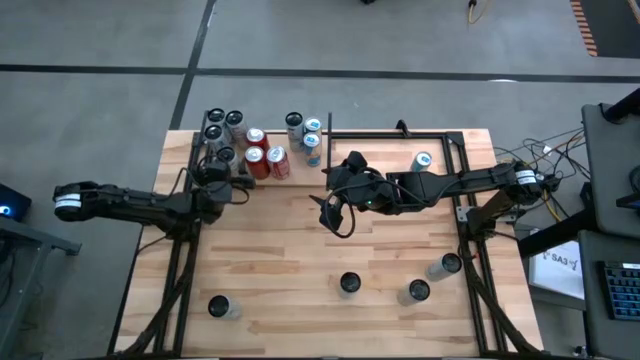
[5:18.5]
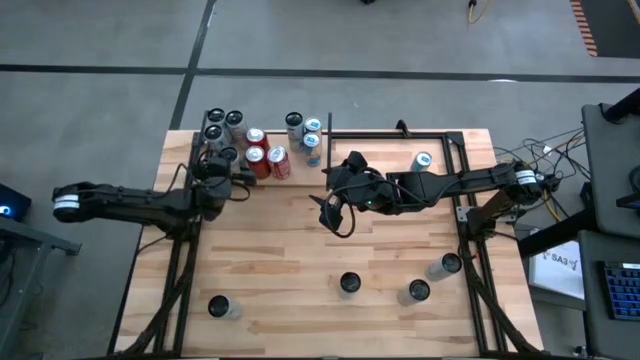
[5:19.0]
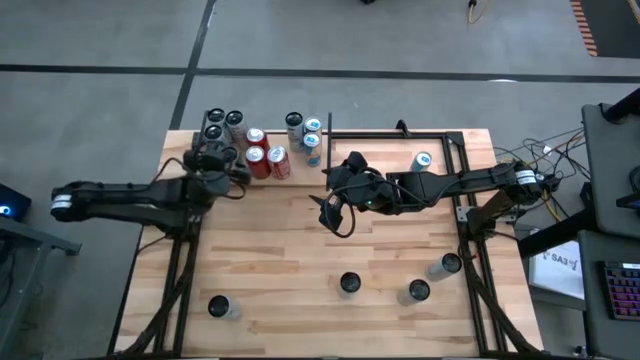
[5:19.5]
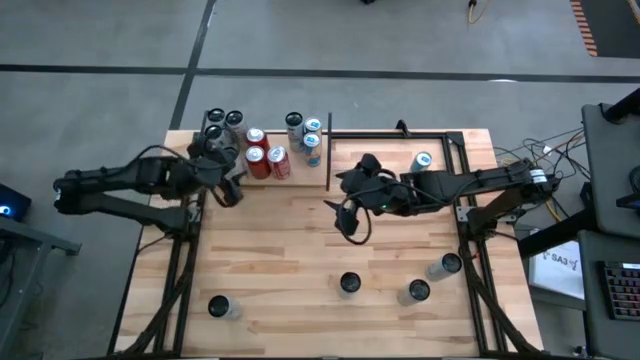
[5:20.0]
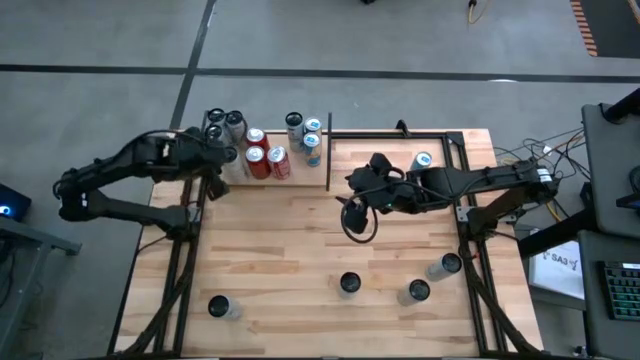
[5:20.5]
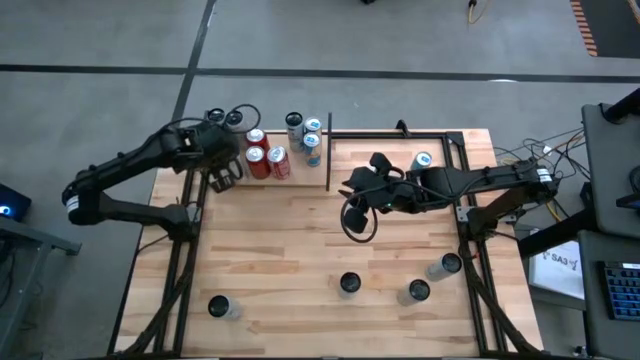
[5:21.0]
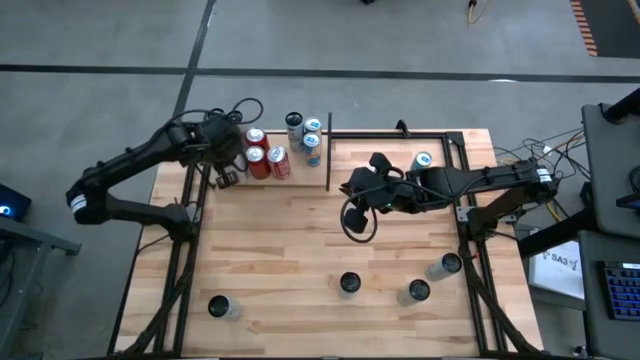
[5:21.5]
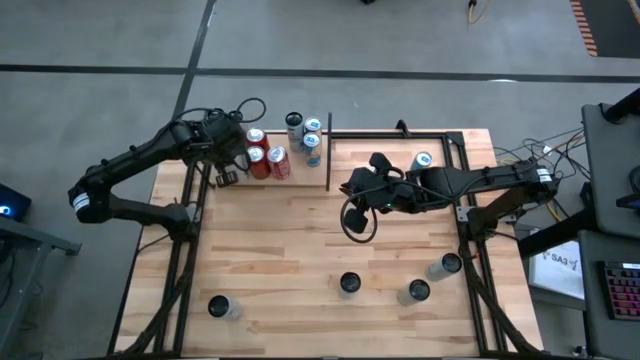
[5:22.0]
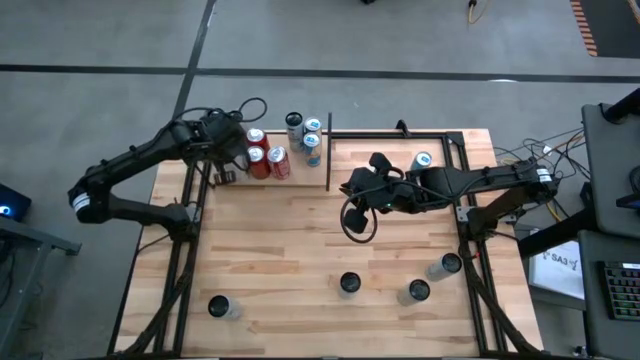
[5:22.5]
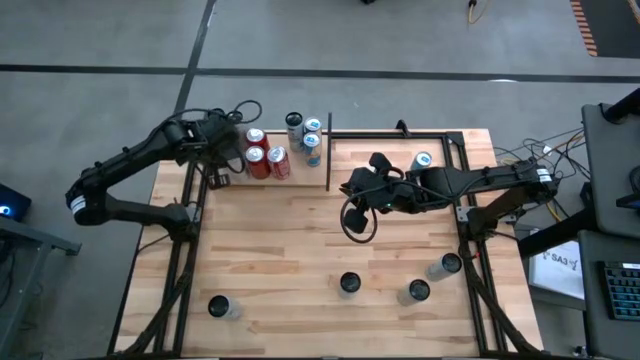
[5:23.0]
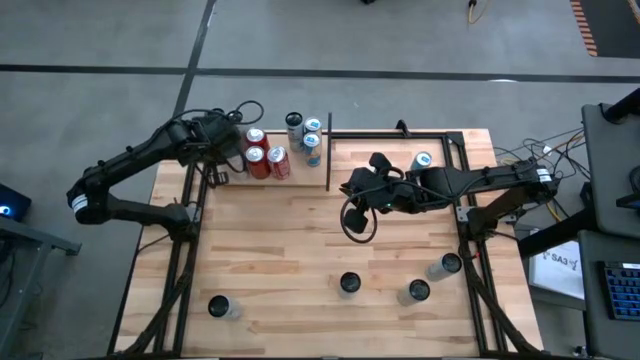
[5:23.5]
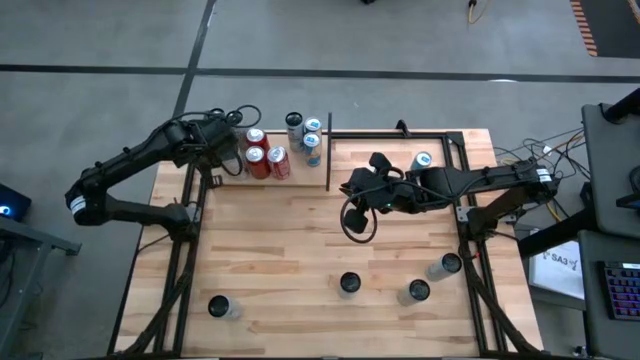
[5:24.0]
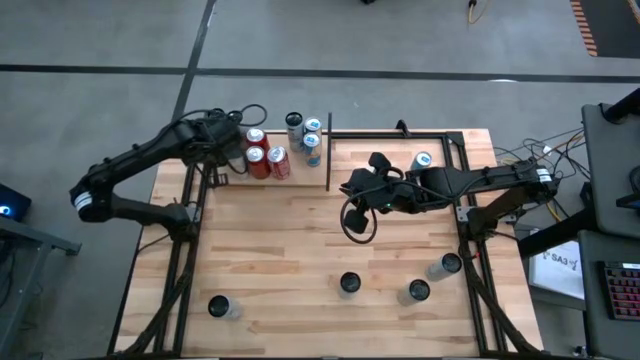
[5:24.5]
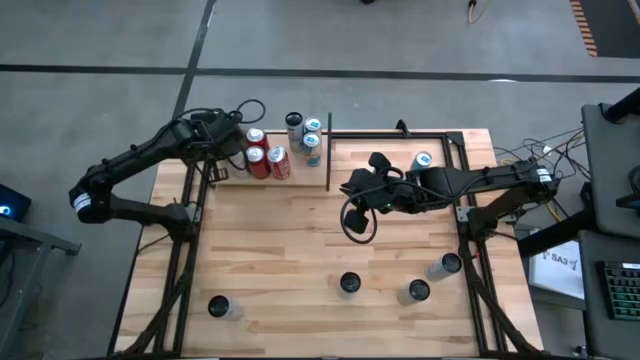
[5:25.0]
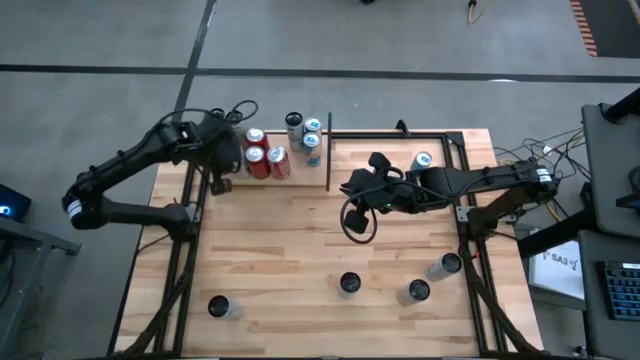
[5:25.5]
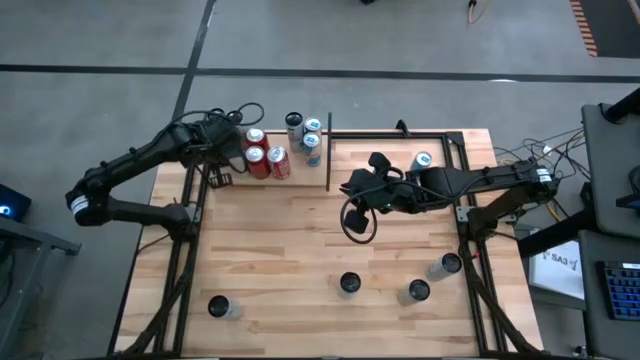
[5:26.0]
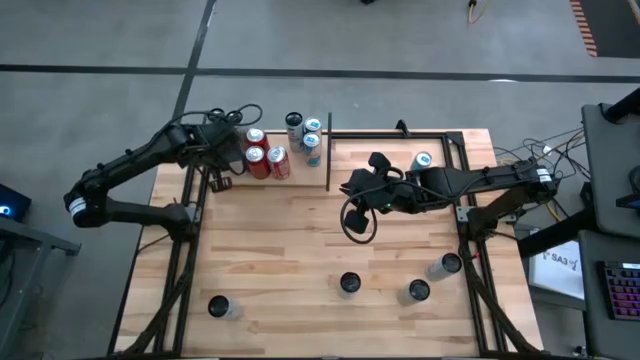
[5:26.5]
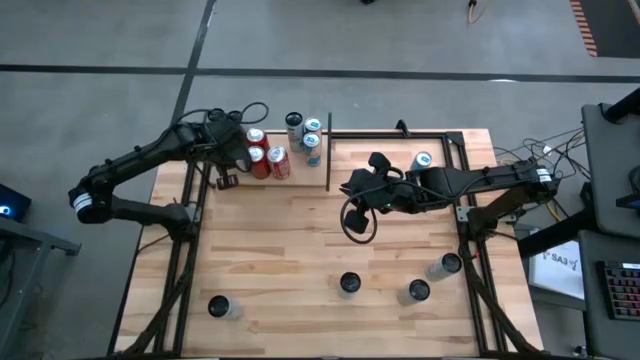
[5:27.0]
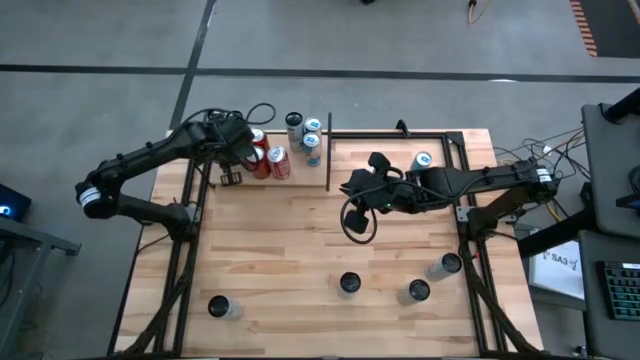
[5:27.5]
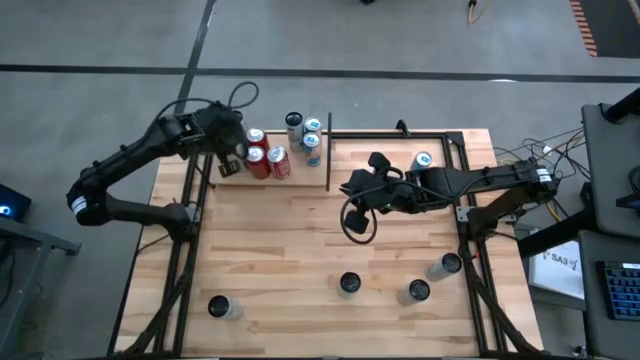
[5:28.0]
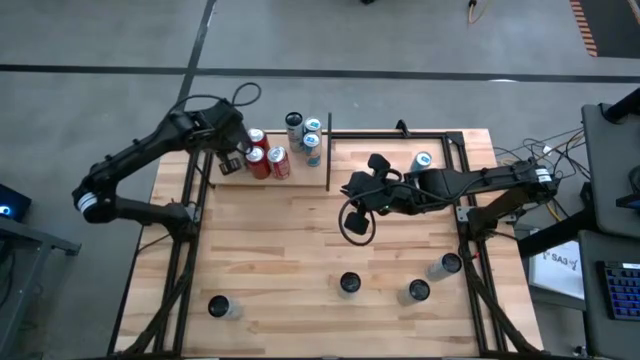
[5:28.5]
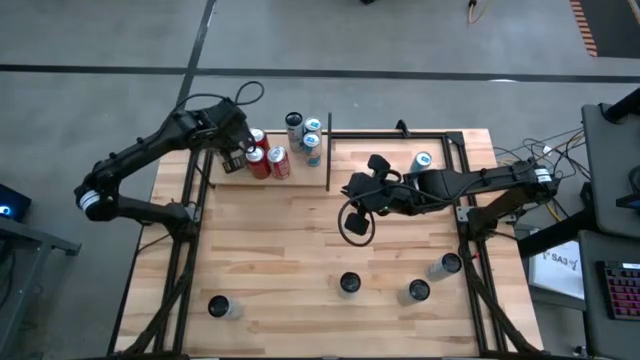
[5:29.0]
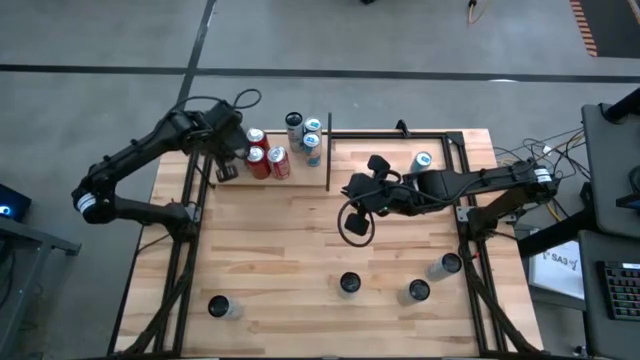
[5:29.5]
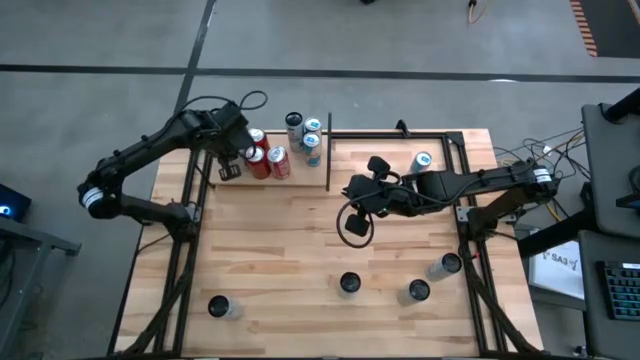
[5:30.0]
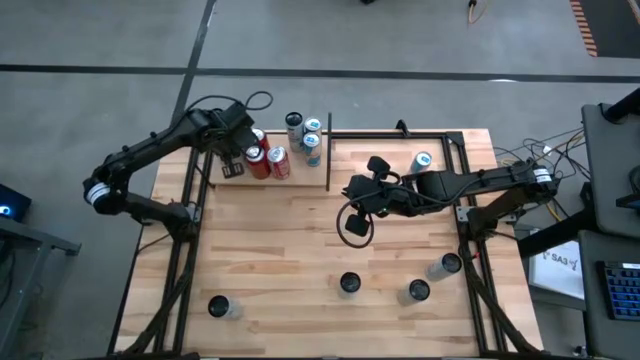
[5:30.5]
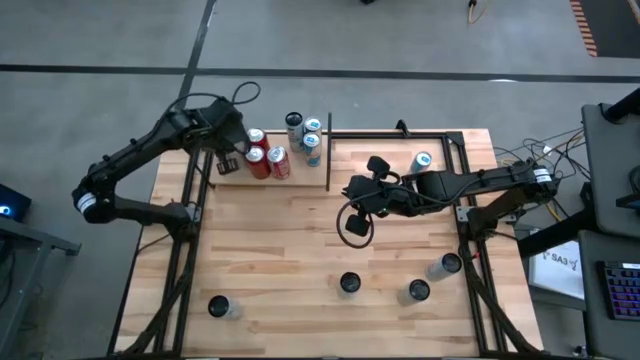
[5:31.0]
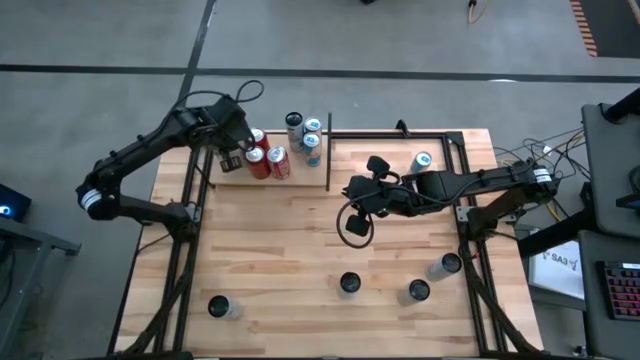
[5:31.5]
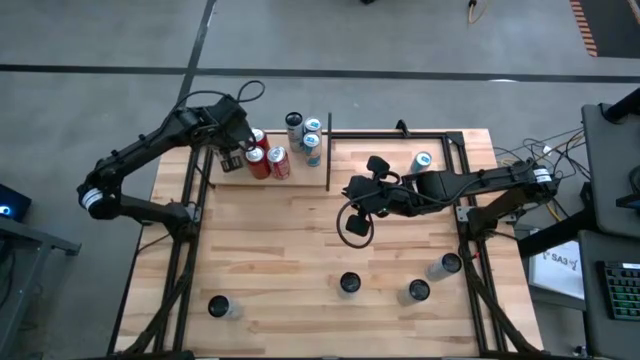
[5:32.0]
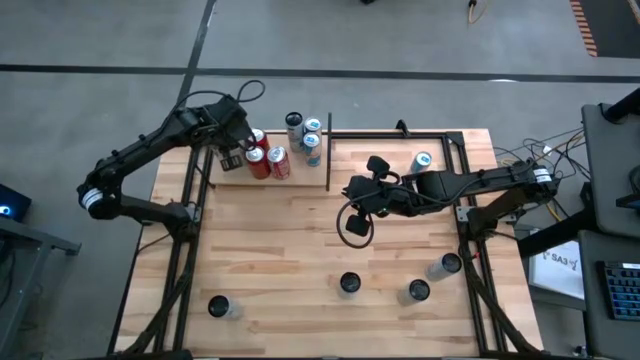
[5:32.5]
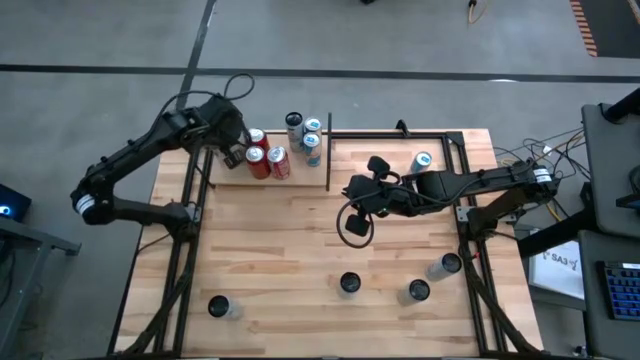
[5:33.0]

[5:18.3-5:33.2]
Task: Place canned beverage on shelf
Put the top white and yellow soda can on the shelf aligned with the other white and yellow soda can

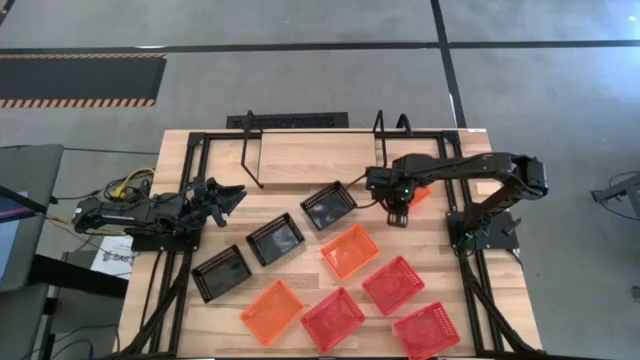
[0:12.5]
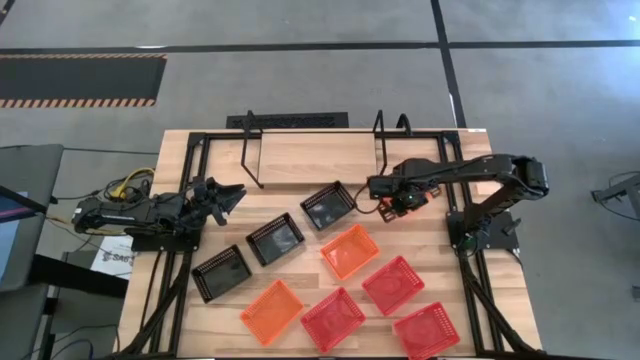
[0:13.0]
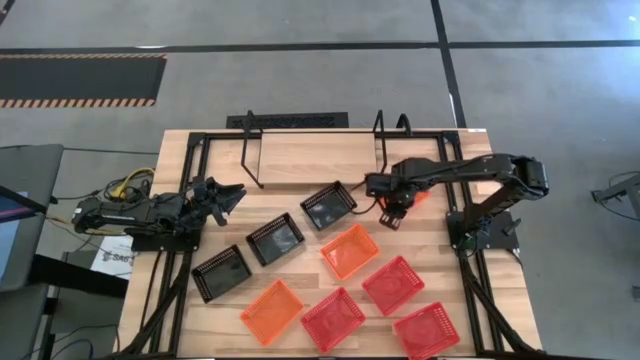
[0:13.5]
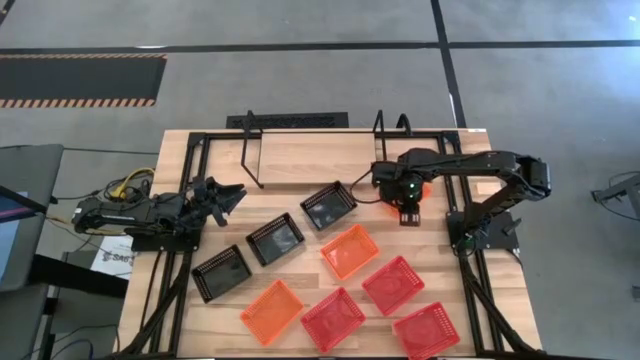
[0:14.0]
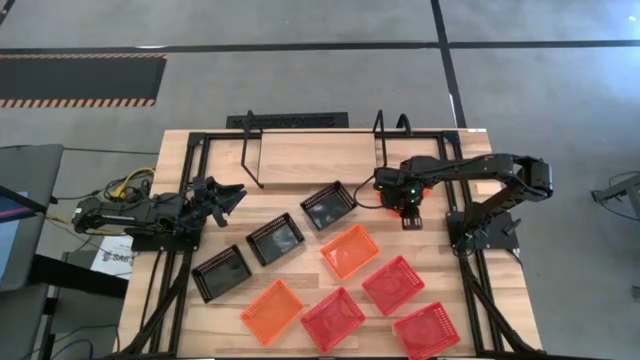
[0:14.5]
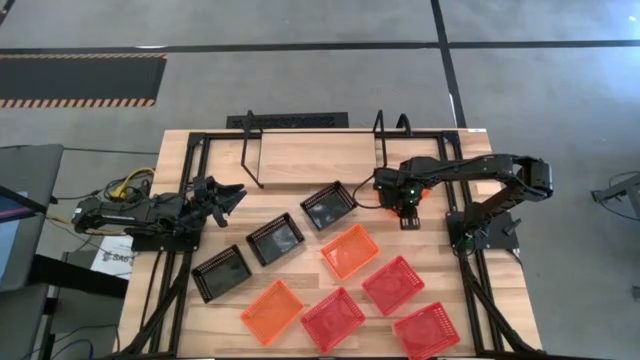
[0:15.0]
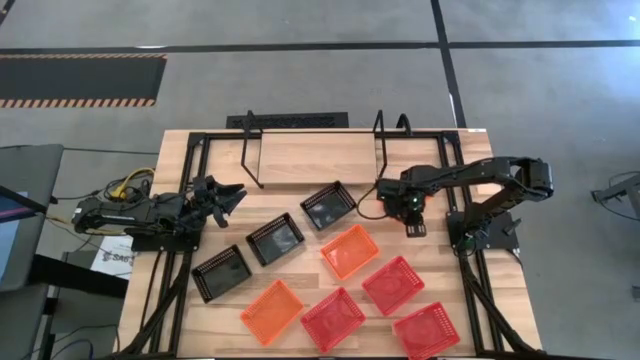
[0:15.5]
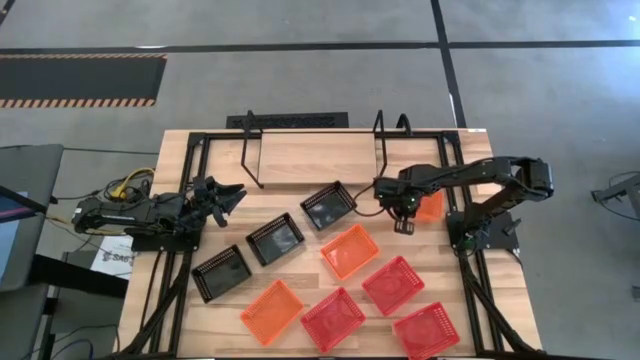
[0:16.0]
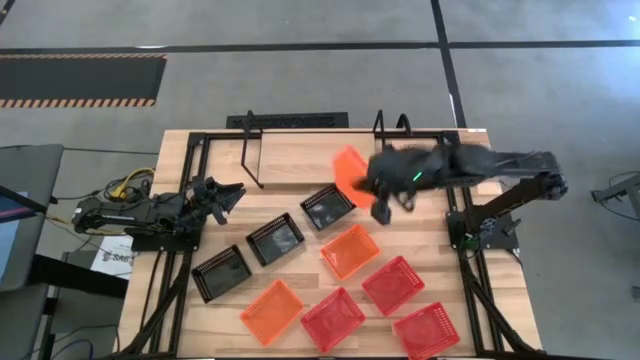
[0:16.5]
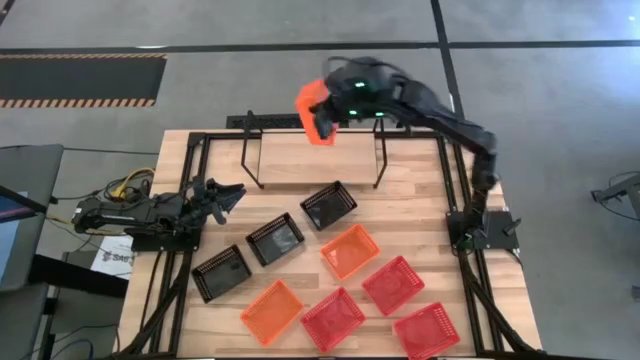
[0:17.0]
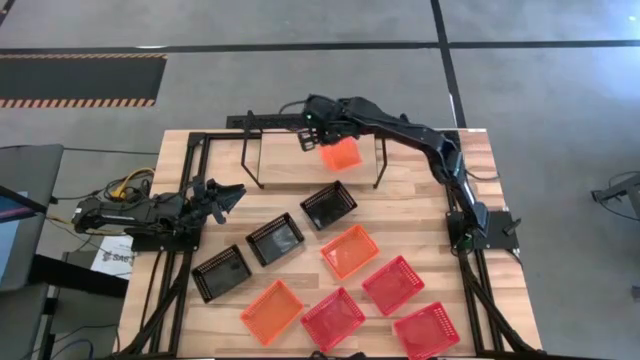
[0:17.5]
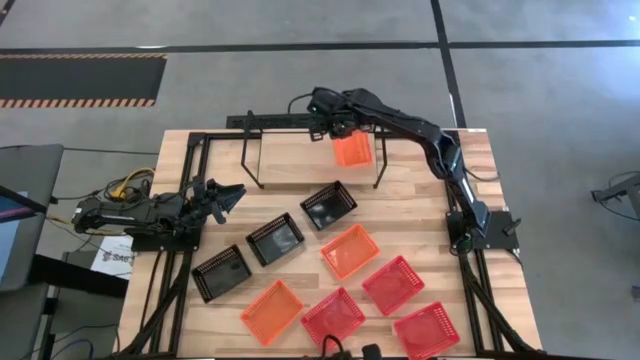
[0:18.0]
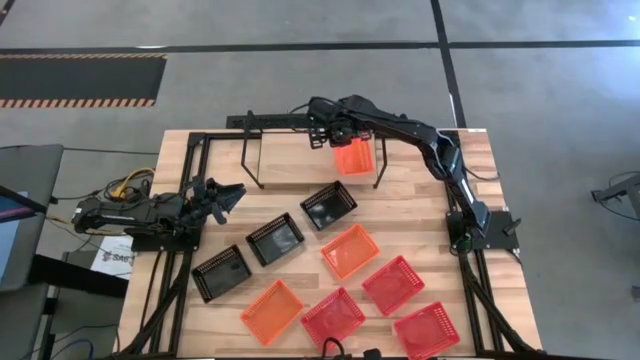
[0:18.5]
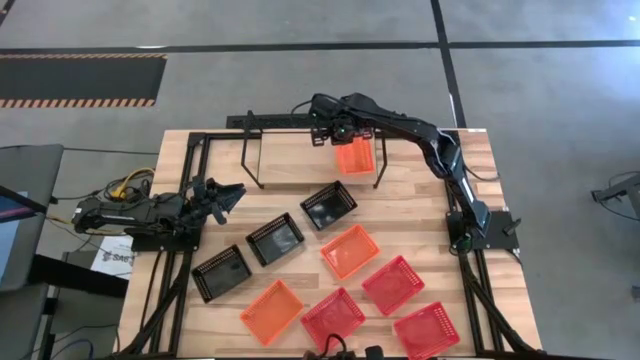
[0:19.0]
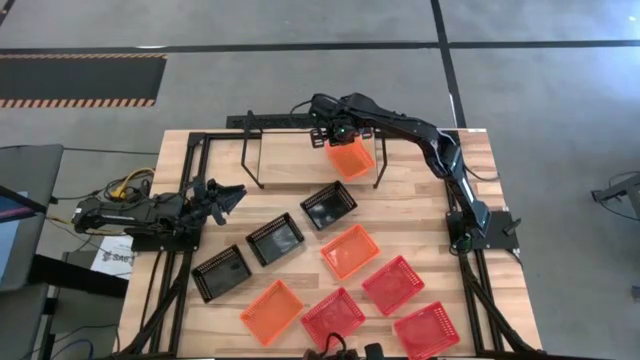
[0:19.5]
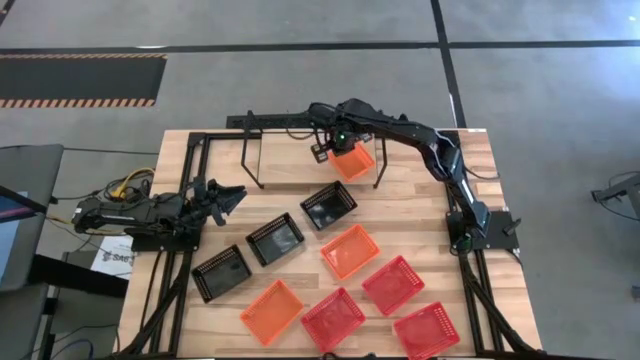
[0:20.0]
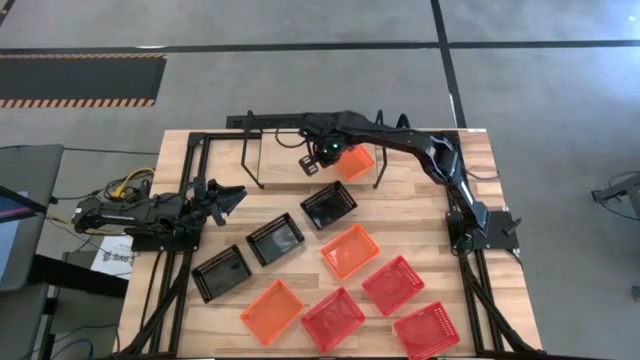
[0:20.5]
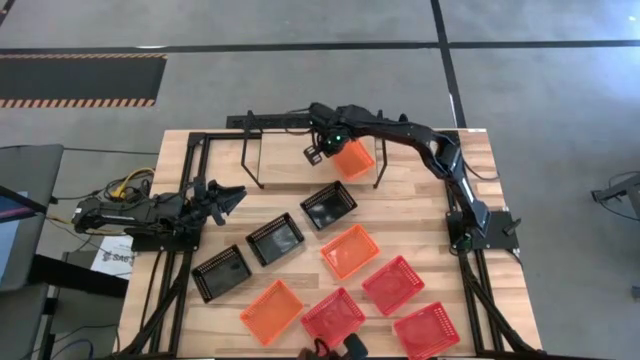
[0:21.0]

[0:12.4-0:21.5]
Task: Stack baskets on shelf by color
Put the top orange bin on the shelf
